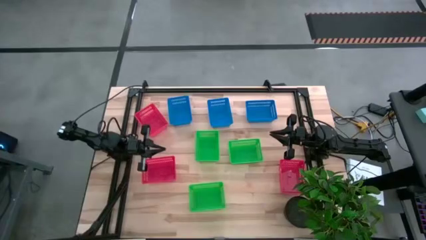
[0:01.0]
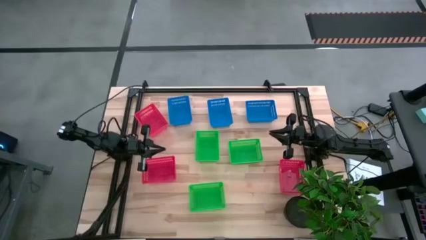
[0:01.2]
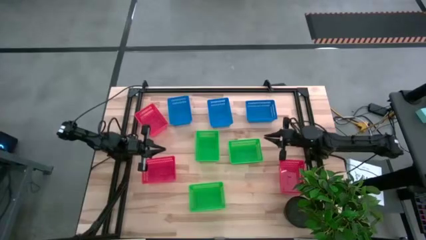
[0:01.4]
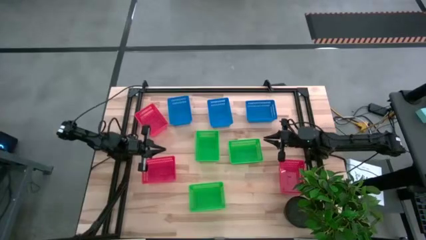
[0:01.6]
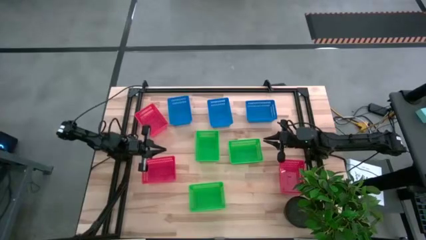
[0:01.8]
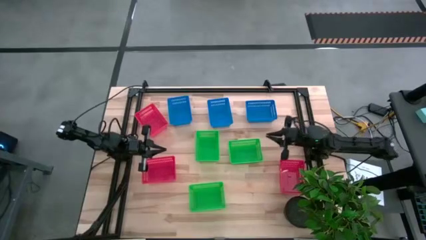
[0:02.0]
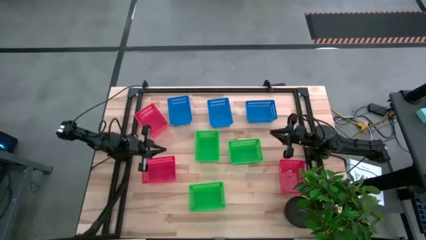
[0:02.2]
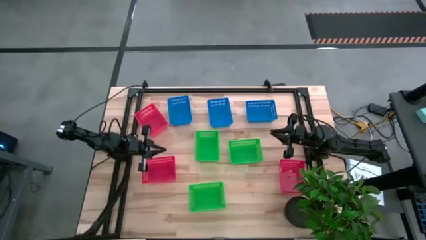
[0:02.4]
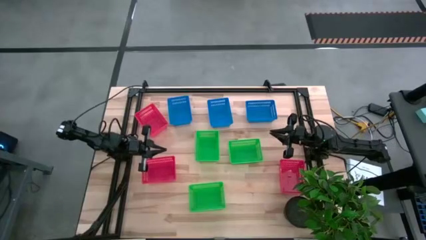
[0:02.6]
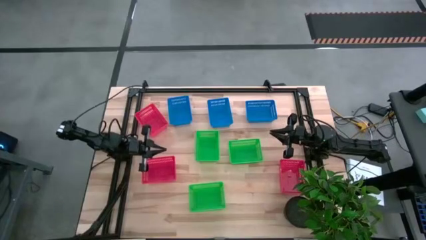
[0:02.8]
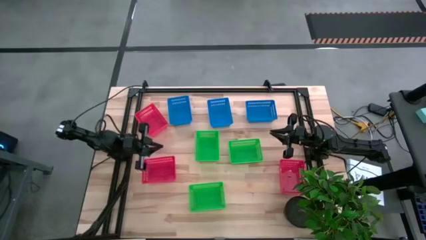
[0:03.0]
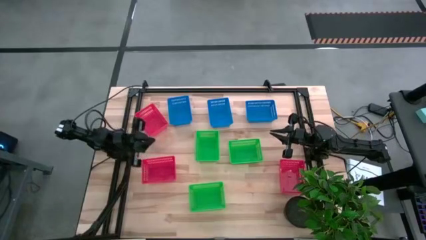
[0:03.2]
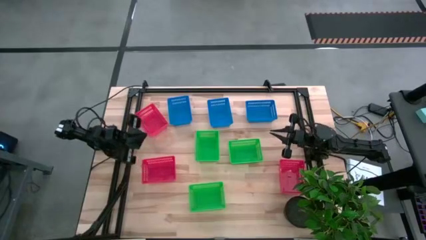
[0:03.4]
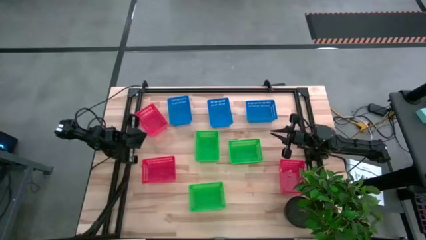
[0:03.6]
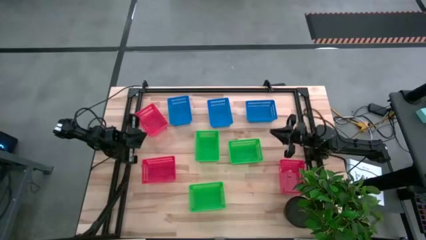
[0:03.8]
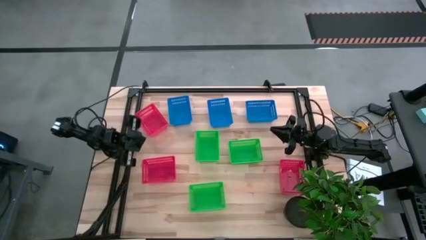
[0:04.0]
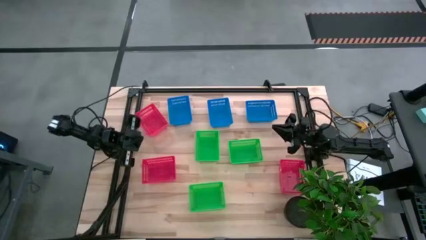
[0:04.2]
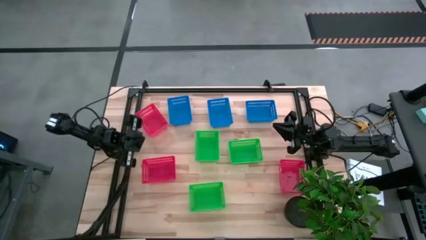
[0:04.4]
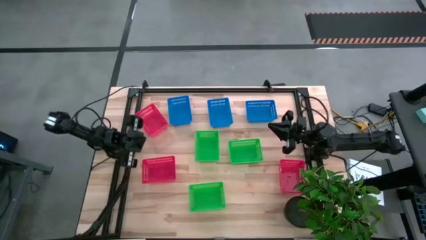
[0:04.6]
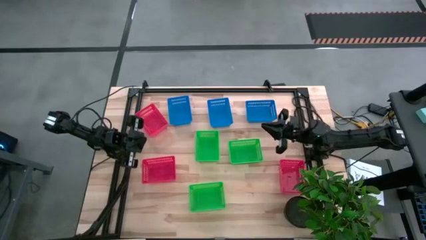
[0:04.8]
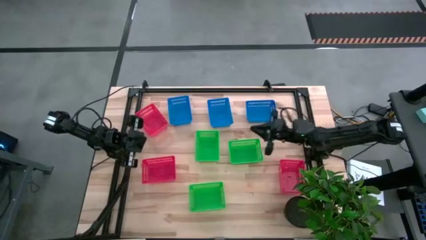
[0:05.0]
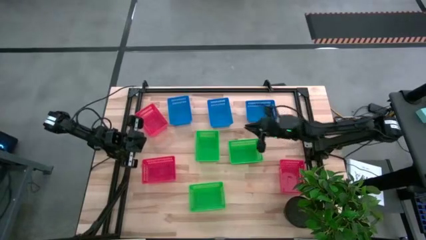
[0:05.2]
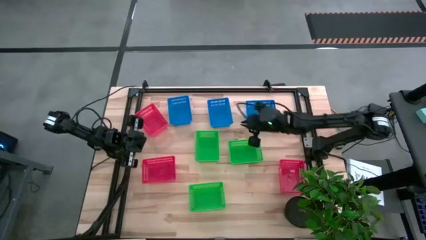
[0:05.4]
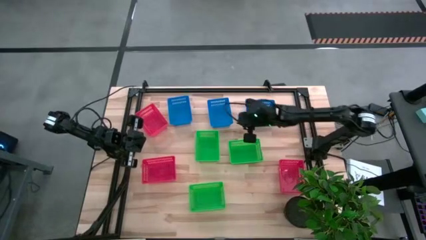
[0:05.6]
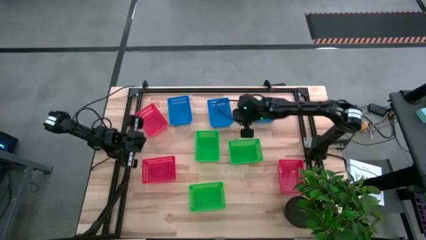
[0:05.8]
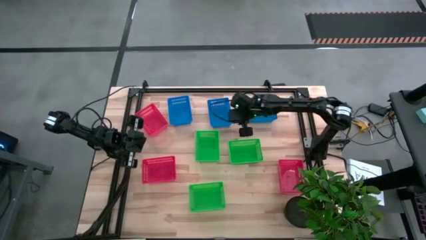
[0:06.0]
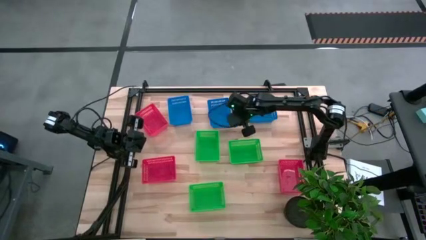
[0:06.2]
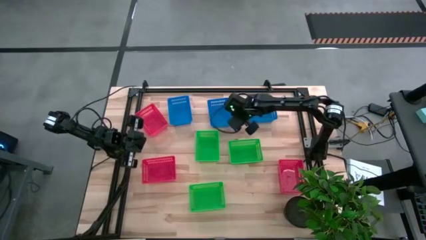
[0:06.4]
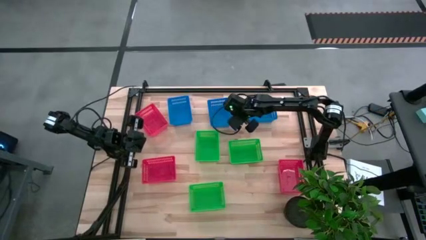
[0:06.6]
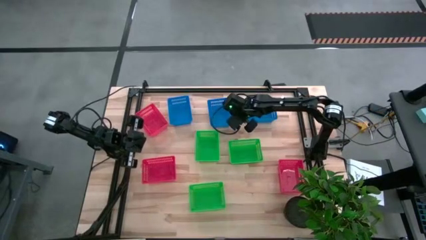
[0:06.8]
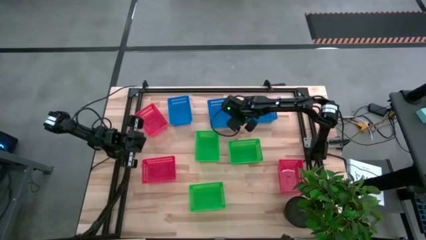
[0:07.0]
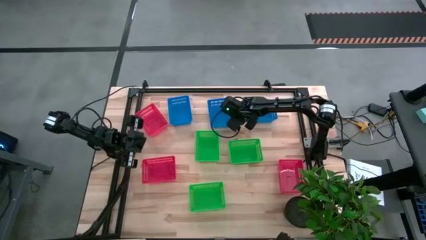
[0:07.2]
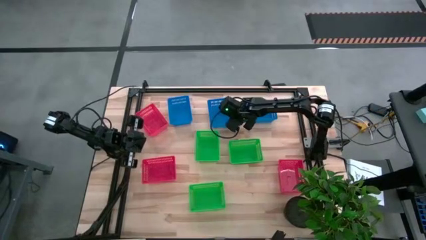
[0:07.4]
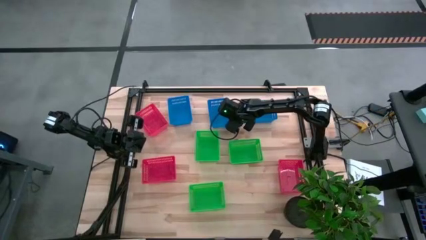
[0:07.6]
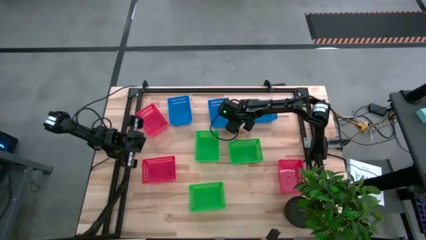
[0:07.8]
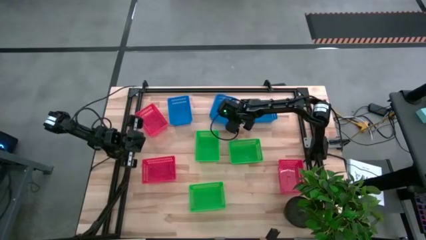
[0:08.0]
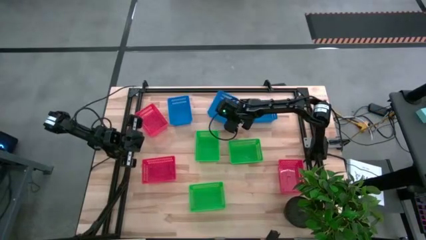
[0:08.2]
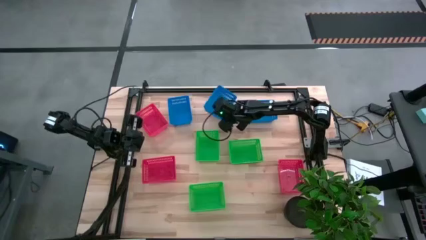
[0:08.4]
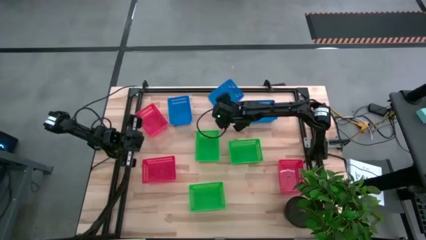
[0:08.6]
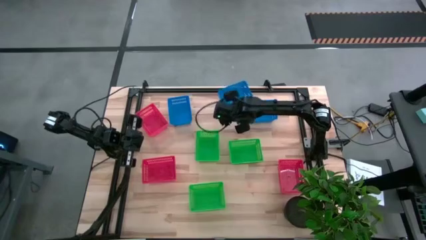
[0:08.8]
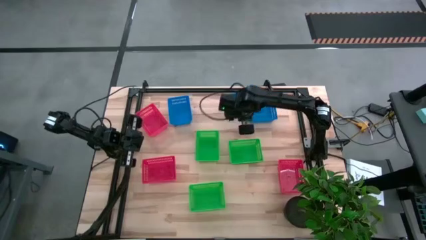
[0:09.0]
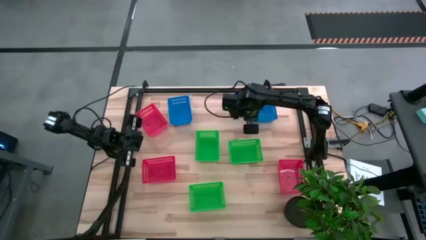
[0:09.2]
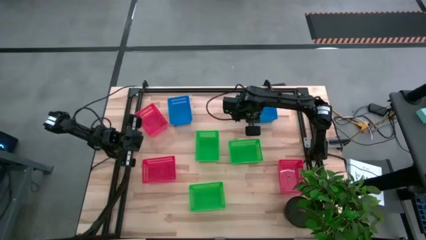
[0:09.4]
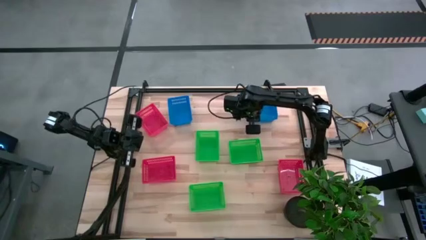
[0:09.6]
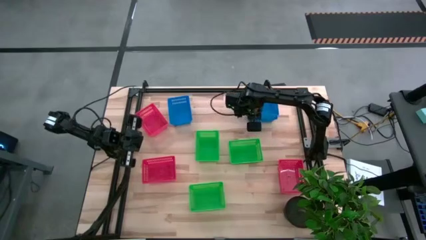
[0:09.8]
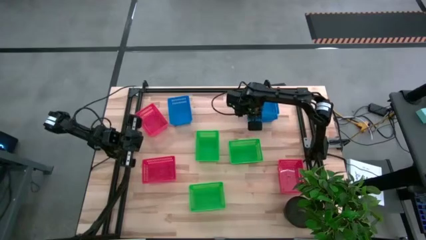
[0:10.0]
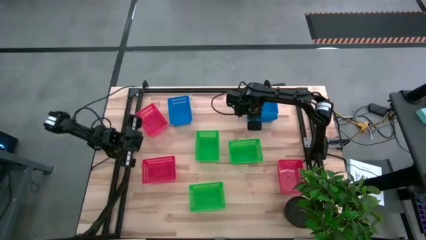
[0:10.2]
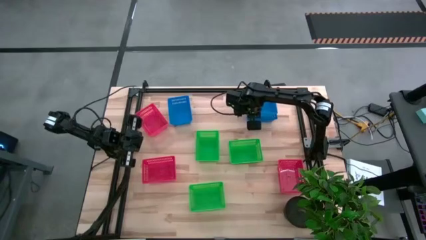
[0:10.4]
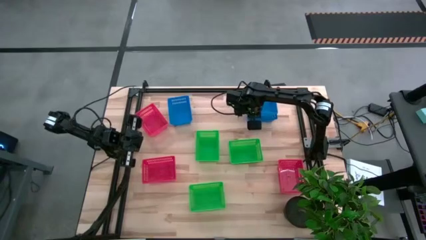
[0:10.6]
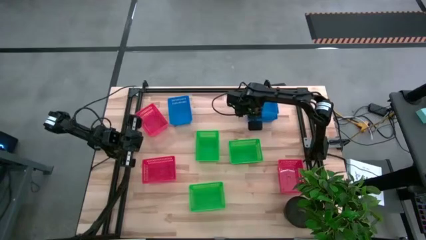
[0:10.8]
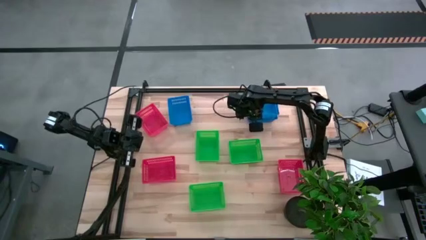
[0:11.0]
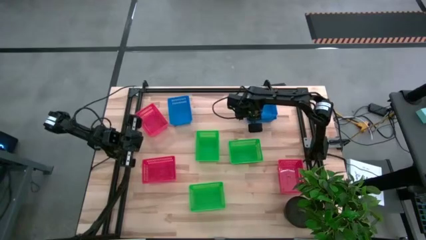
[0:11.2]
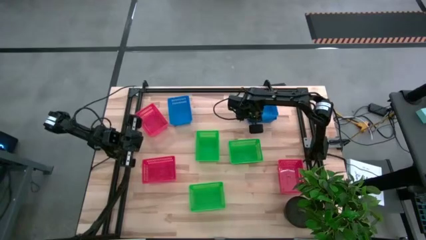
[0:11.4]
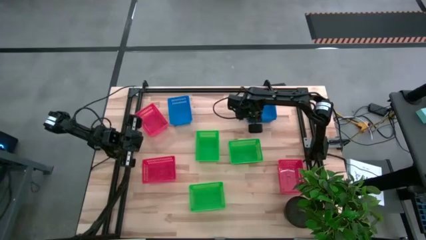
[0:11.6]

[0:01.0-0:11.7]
Stack the middle blue bin on top of the right blue bin
